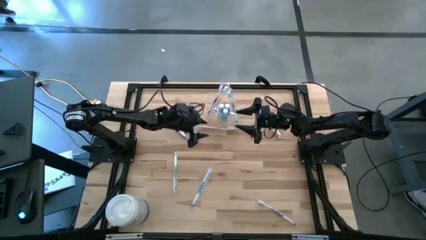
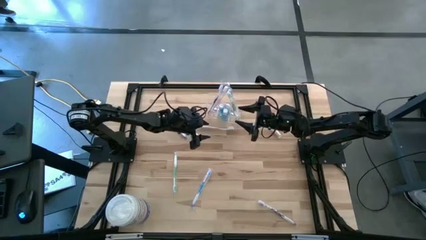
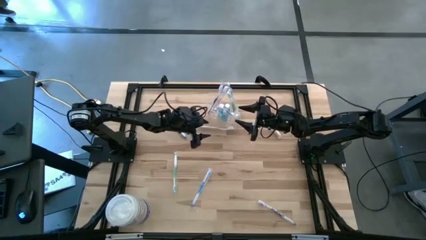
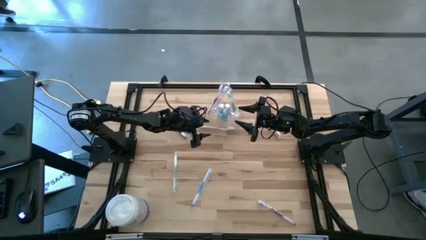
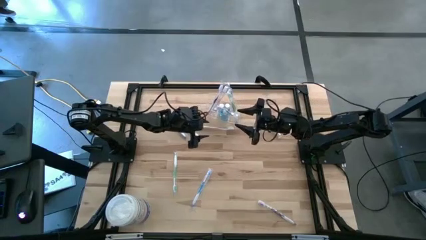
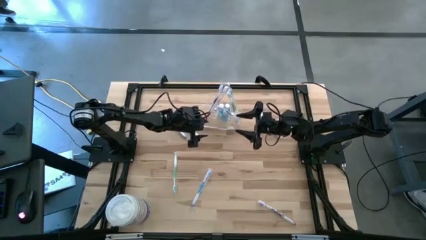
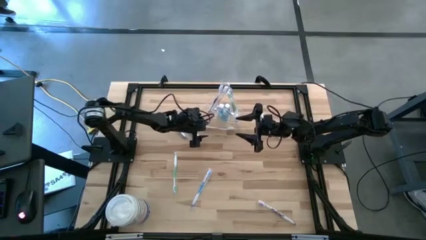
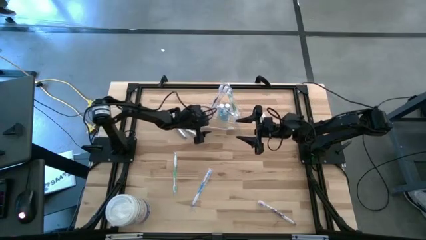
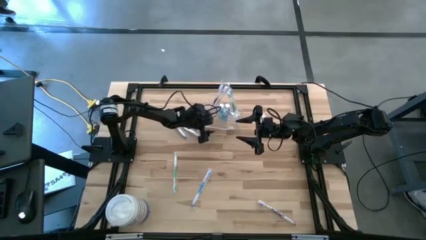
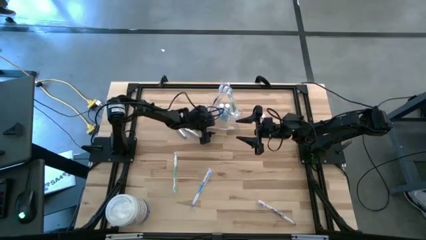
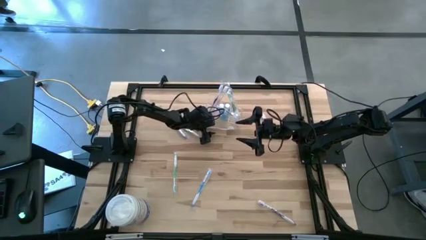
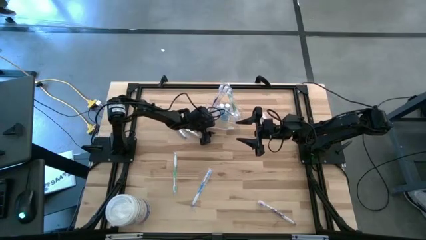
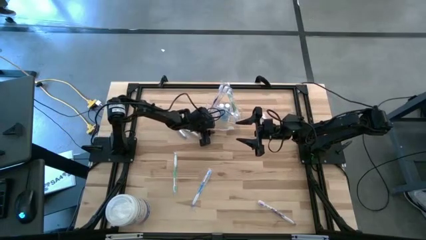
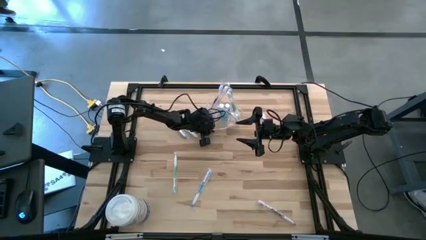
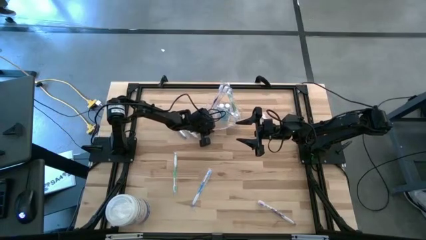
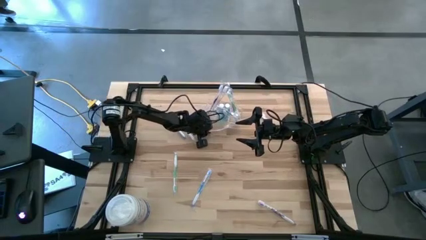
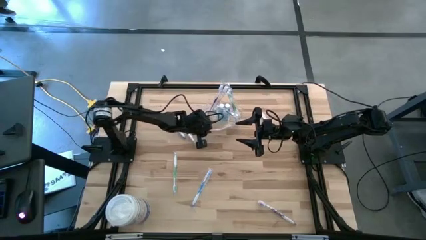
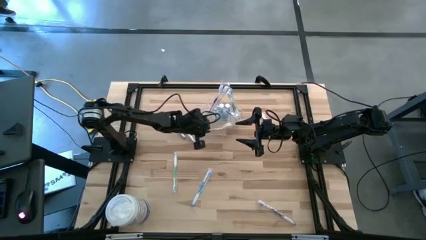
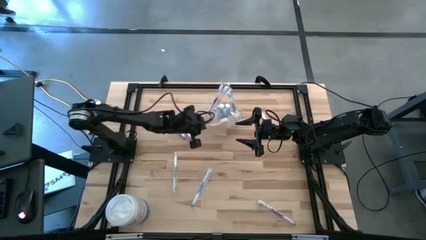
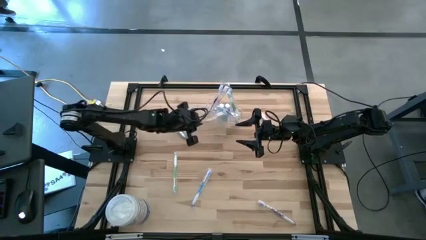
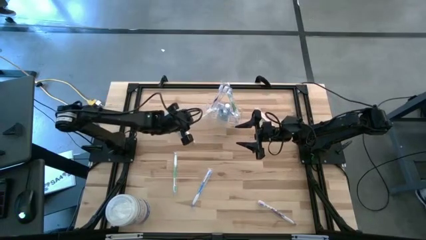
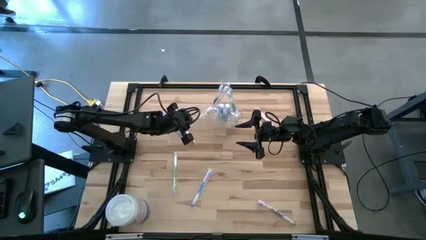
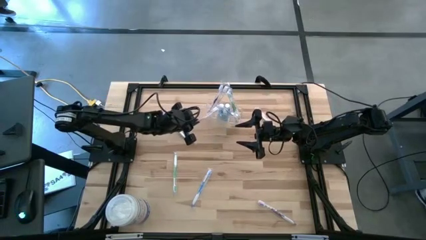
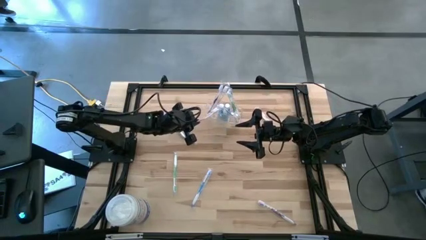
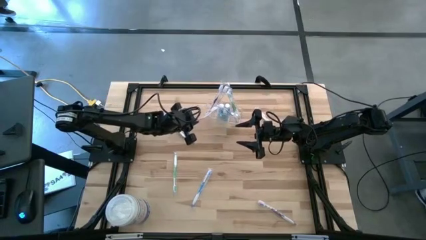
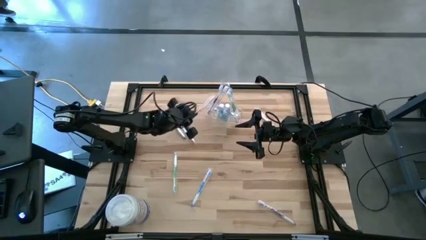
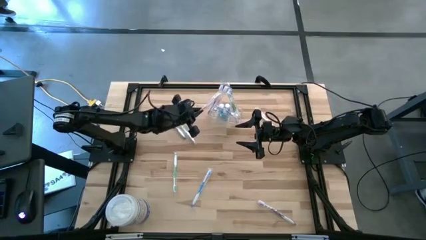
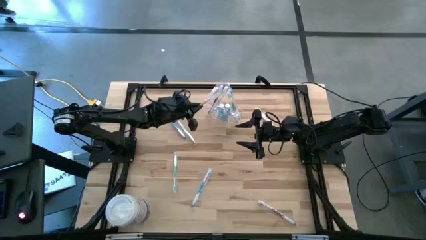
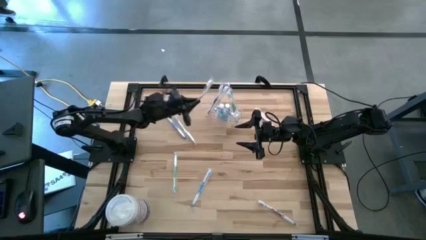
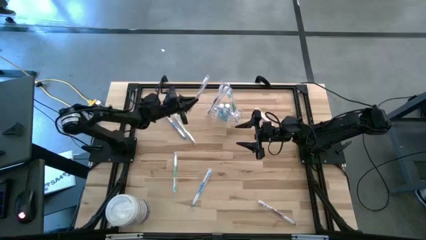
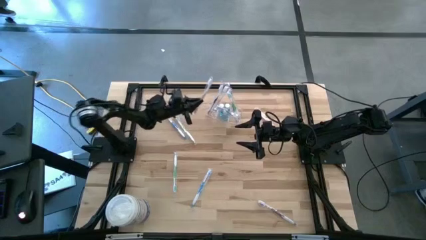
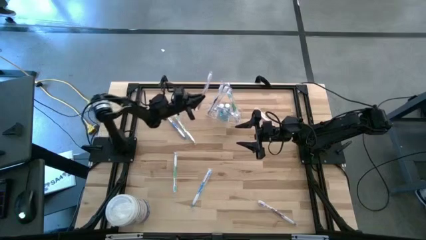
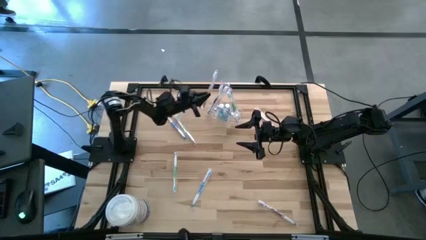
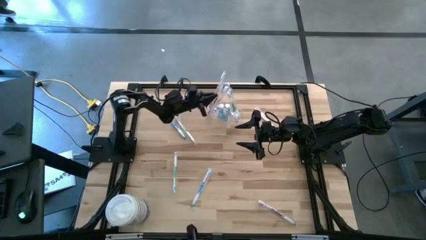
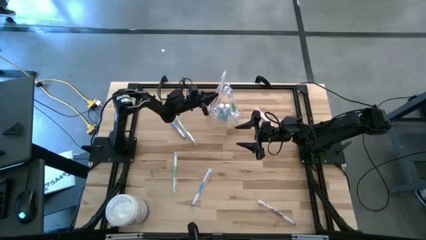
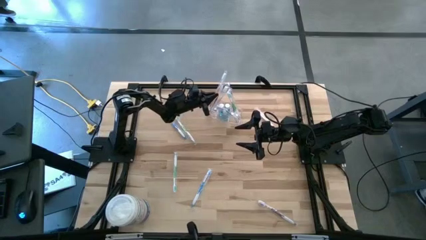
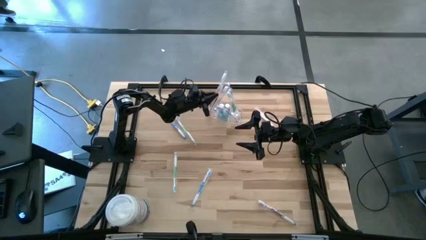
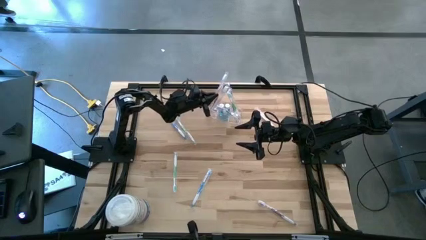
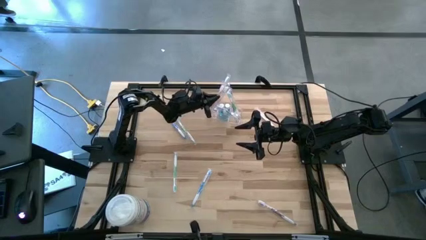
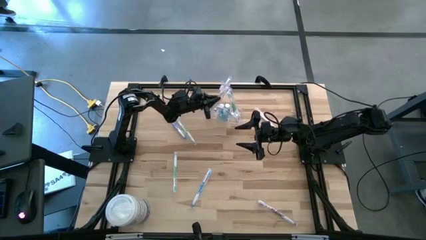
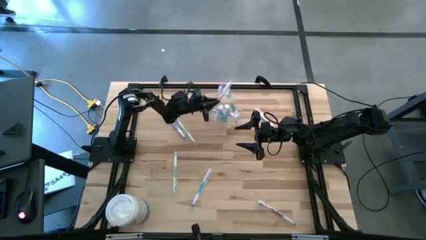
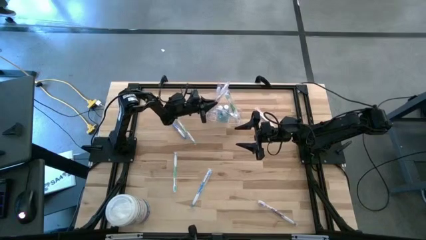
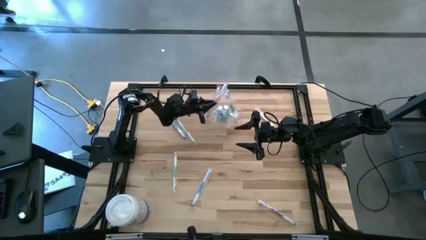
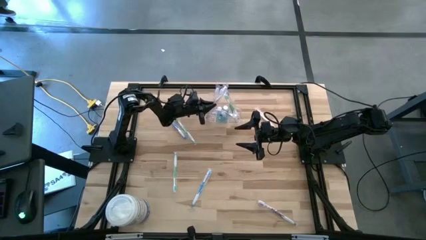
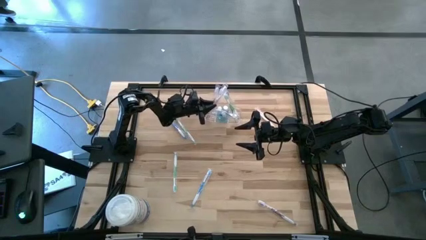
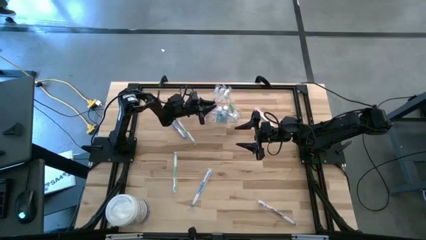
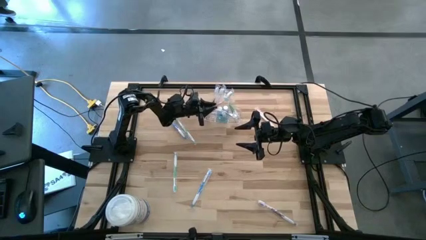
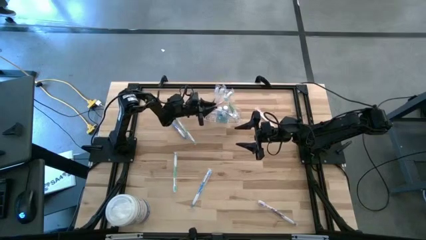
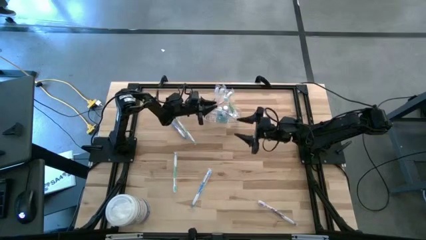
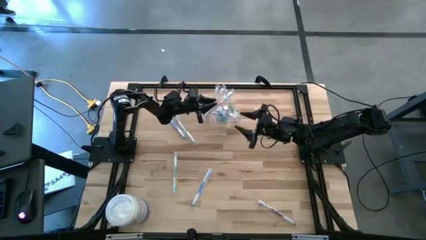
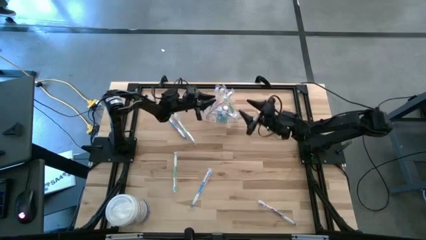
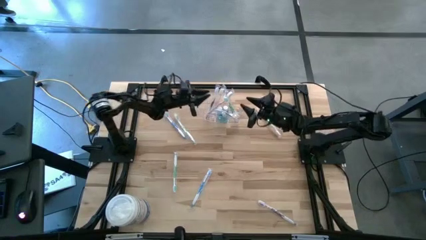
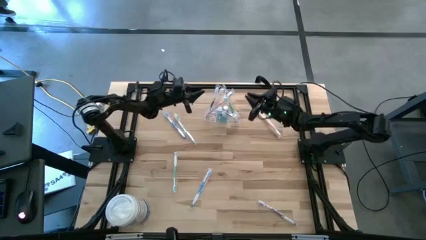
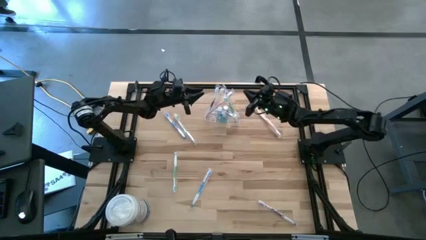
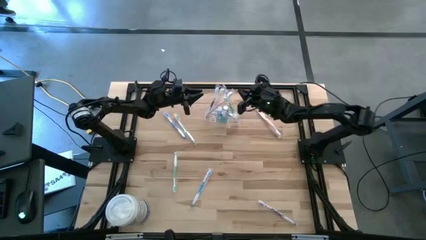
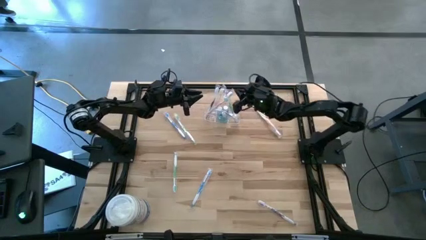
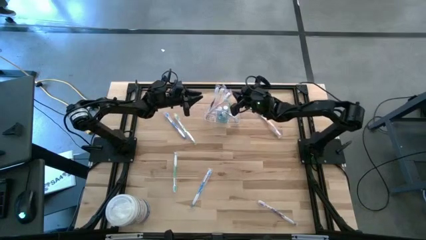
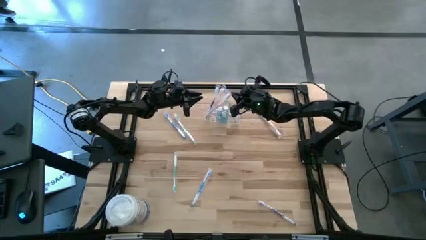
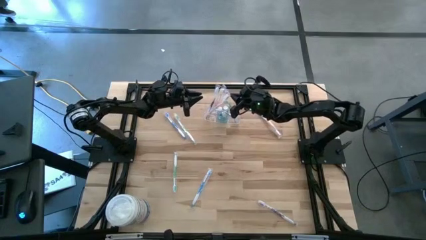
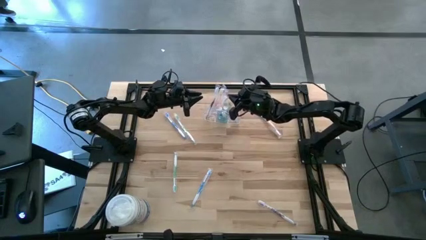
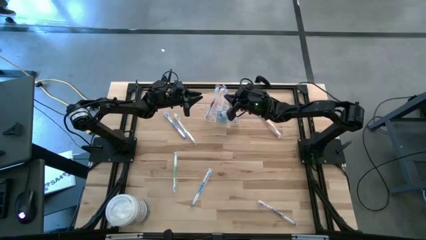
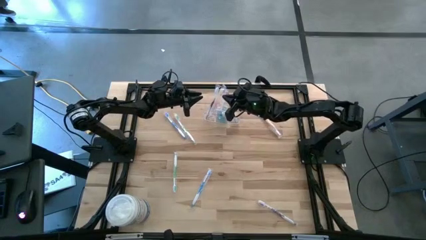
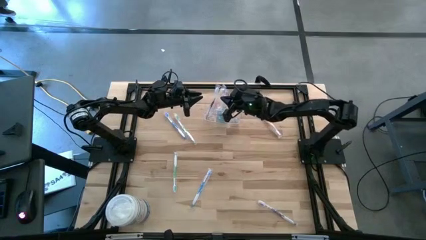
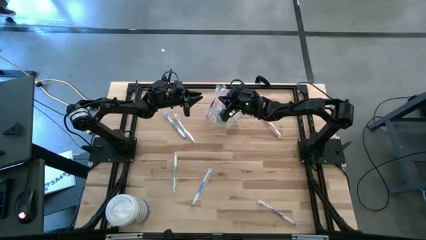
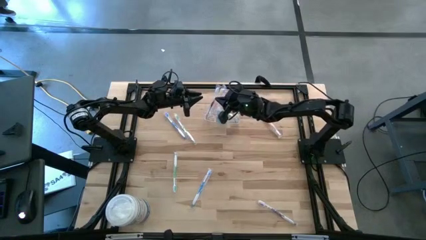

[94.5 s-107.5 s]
Task: Pick & Place toothbrushing station
Put the left orange toothbrush into the transparent organizer

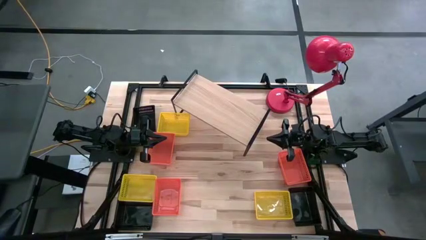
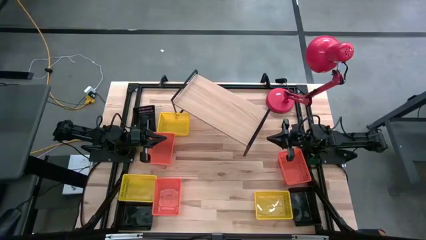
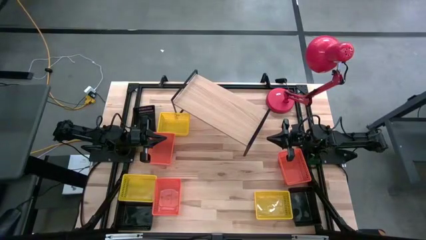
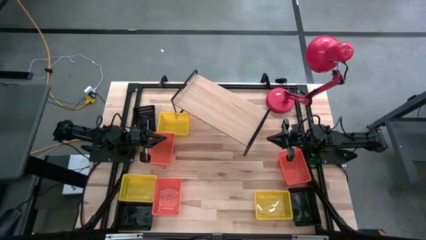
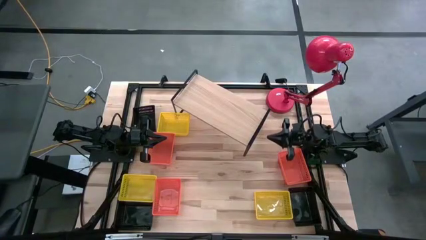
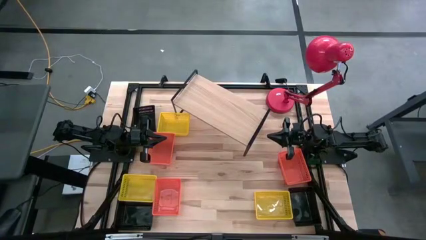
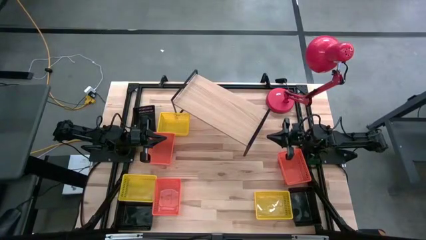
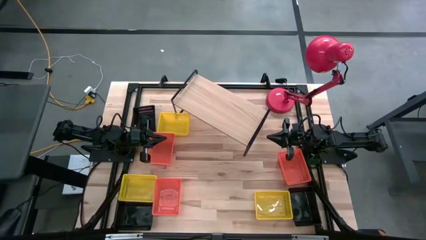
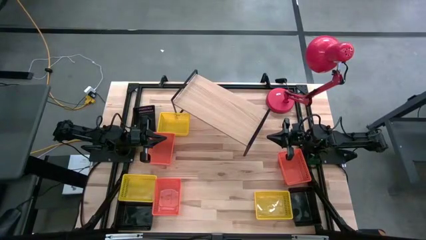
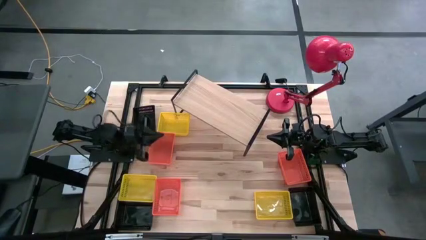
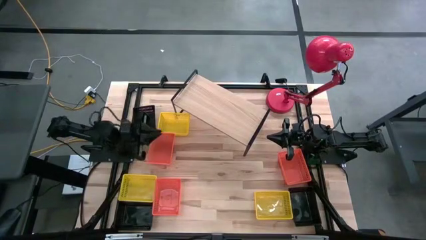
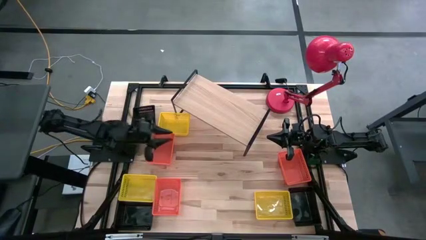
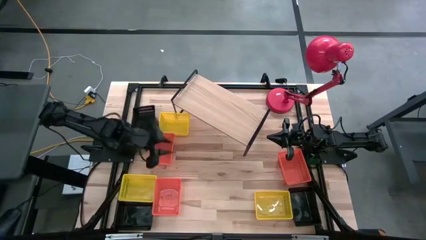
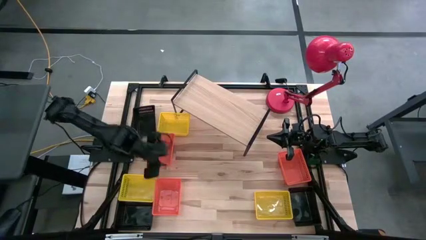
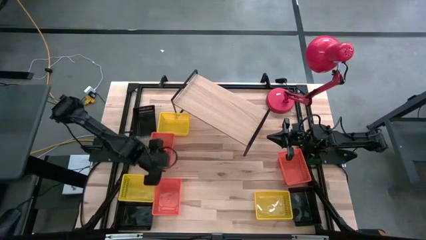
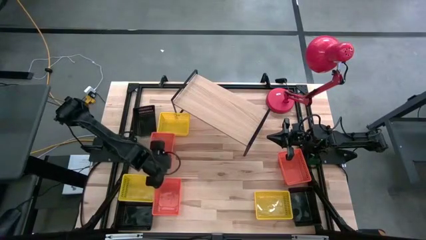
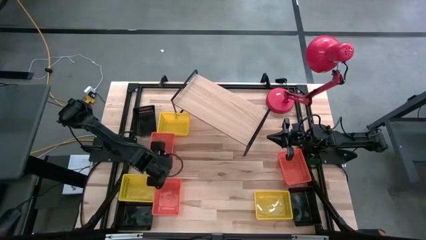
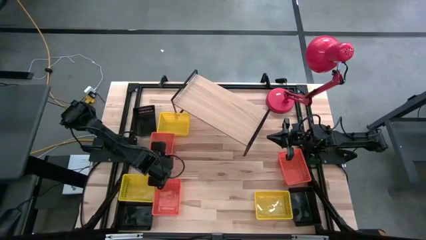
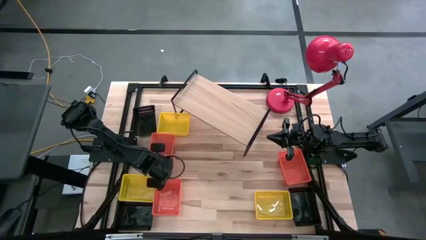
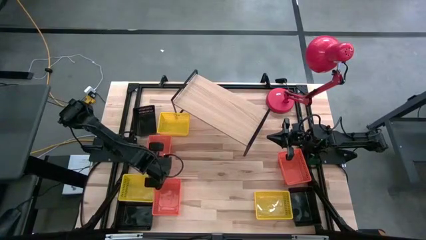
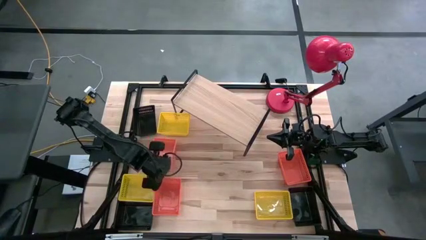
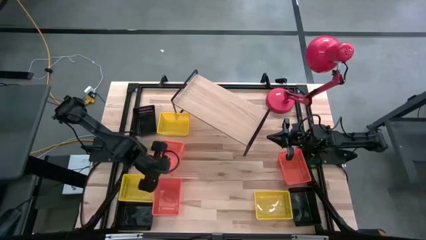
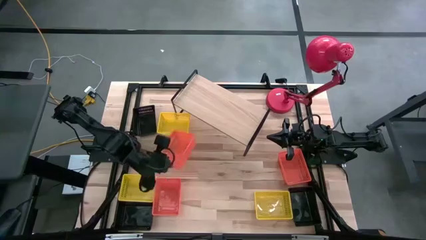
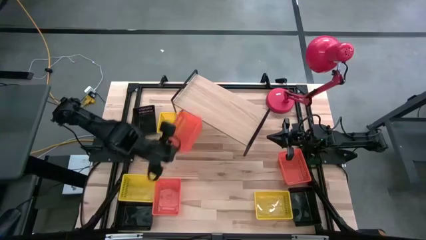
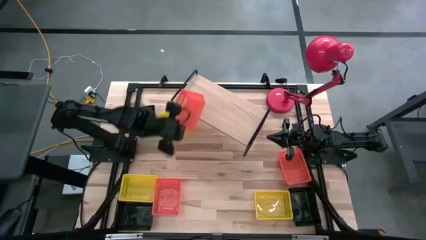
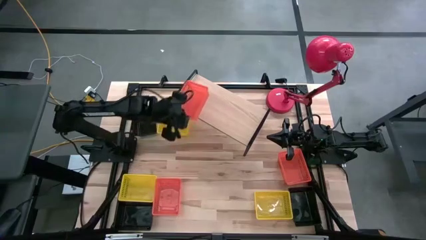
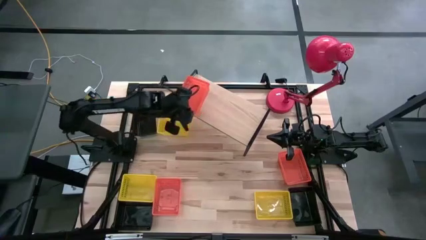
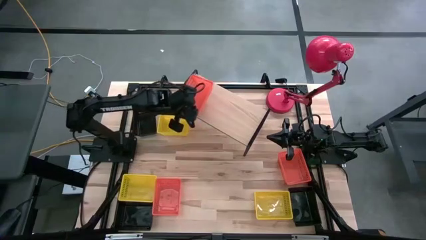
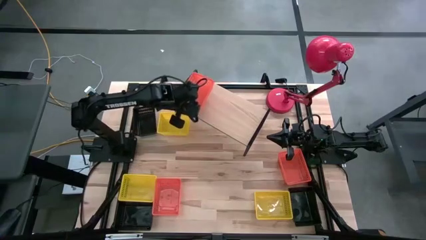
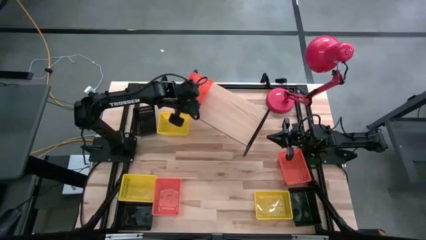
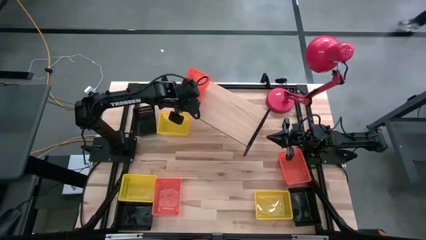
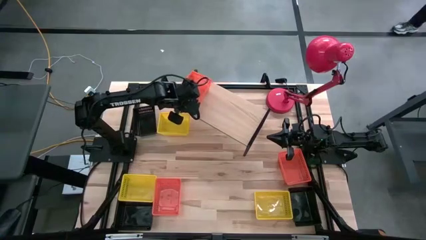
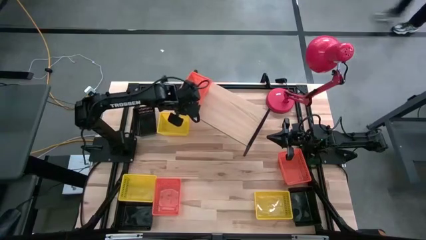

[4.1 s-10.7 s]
Task: Stack baskets on shelf by color
Put the top left orange bin on the shelf
